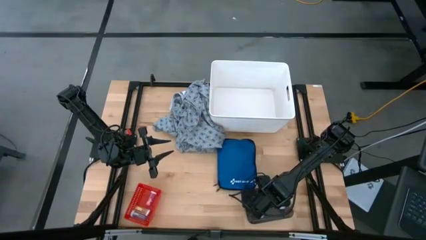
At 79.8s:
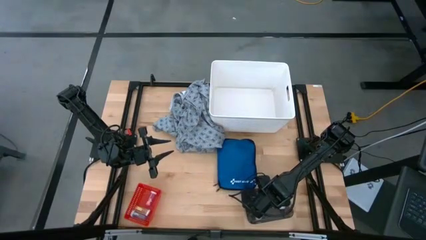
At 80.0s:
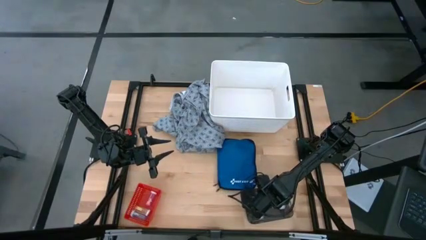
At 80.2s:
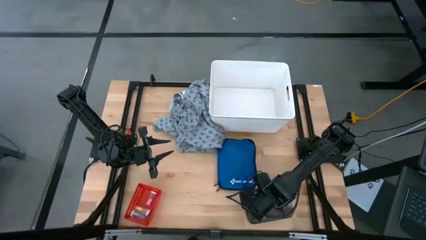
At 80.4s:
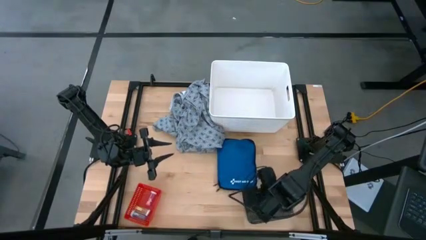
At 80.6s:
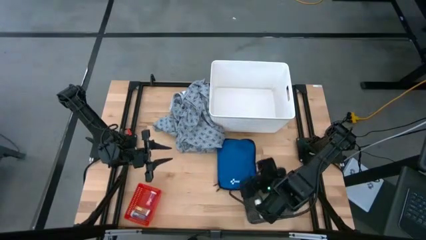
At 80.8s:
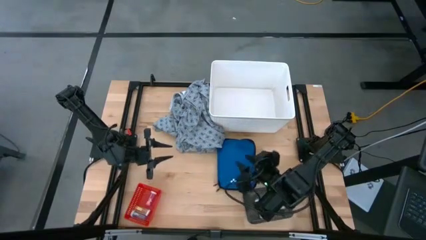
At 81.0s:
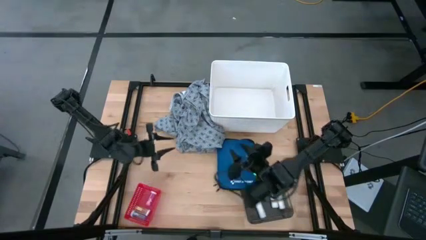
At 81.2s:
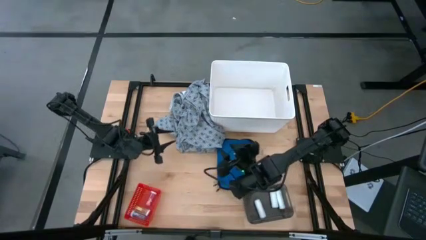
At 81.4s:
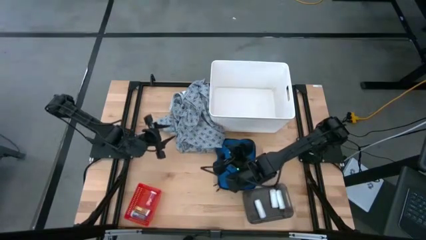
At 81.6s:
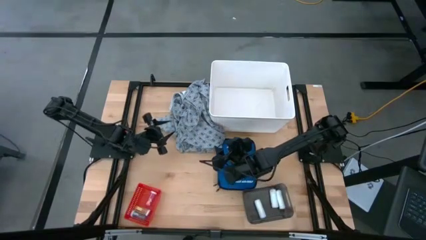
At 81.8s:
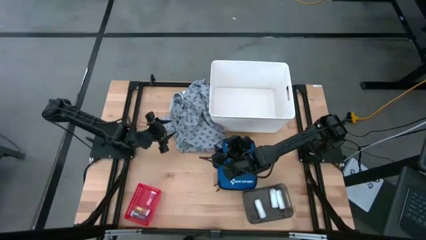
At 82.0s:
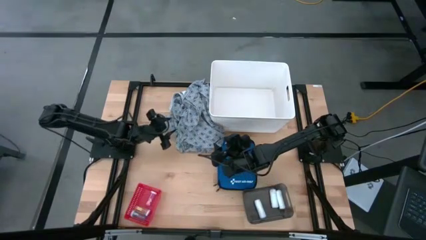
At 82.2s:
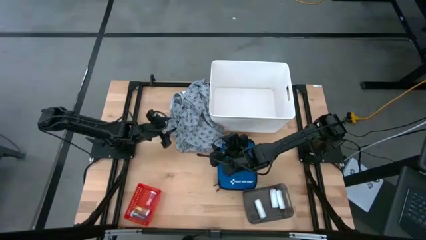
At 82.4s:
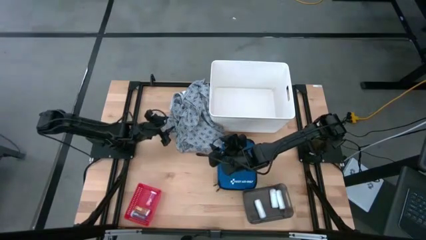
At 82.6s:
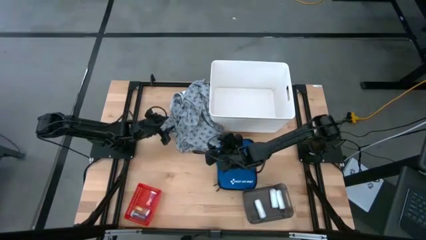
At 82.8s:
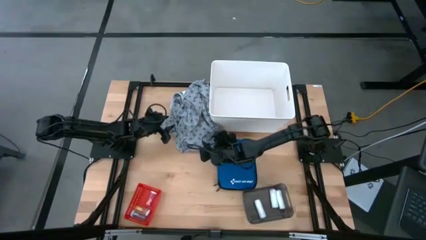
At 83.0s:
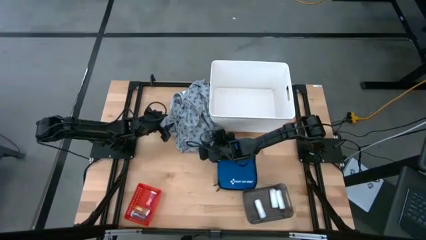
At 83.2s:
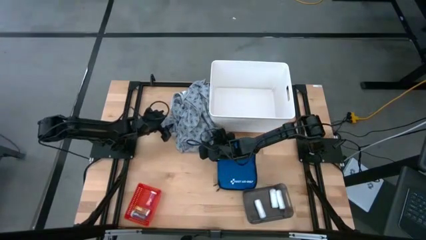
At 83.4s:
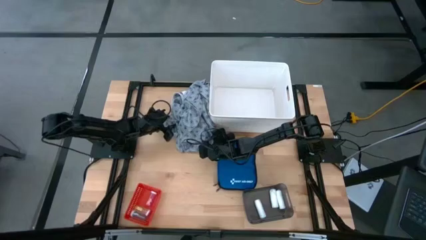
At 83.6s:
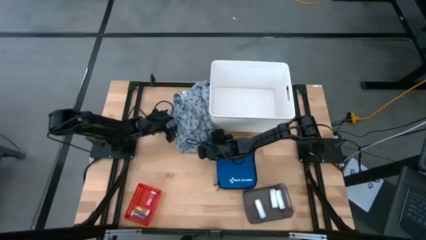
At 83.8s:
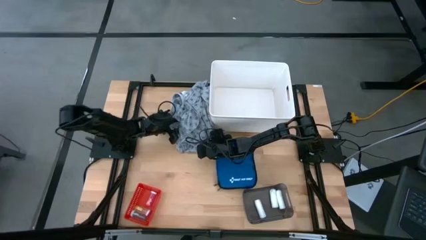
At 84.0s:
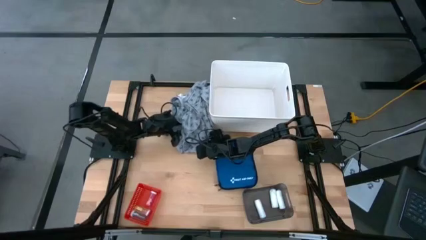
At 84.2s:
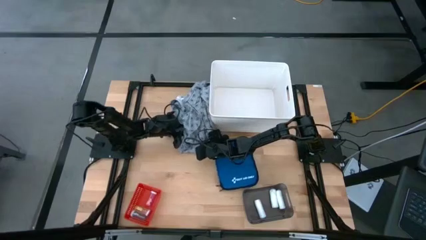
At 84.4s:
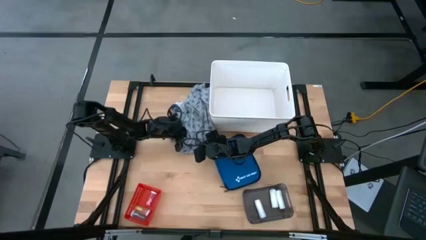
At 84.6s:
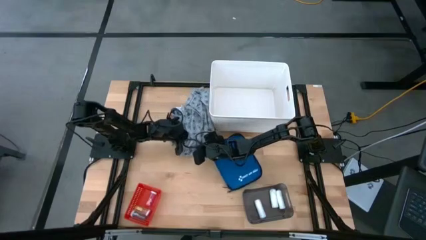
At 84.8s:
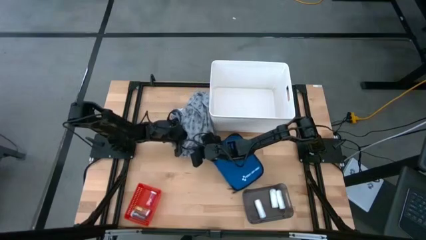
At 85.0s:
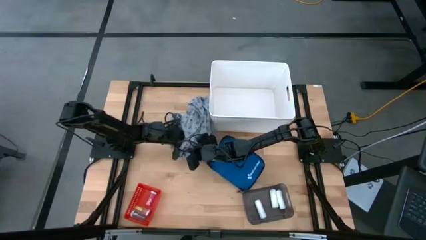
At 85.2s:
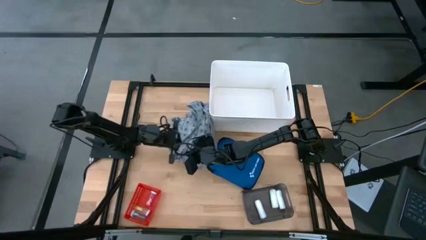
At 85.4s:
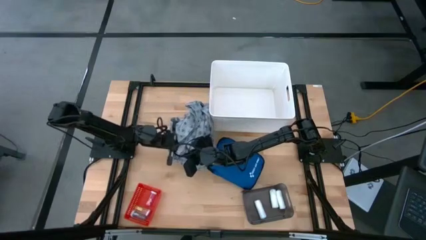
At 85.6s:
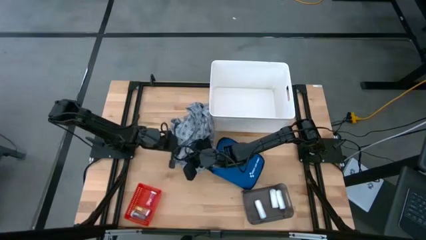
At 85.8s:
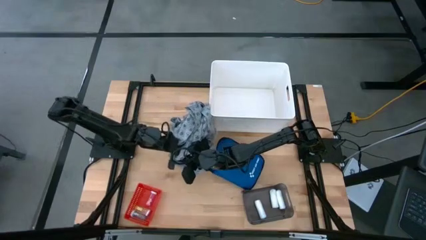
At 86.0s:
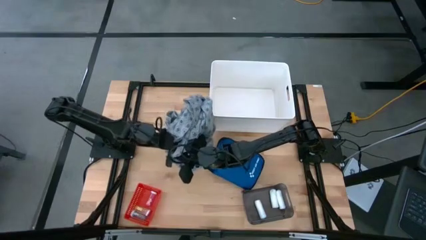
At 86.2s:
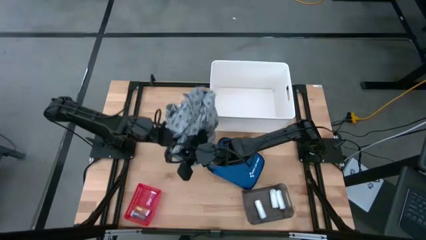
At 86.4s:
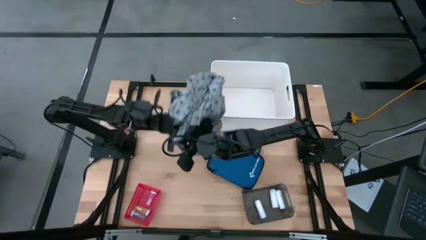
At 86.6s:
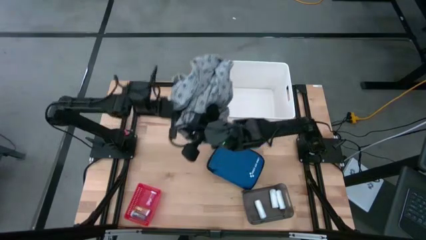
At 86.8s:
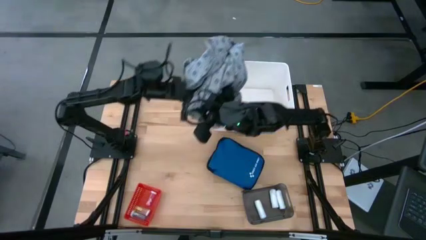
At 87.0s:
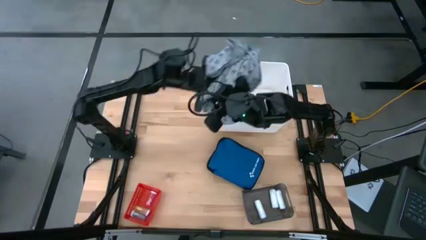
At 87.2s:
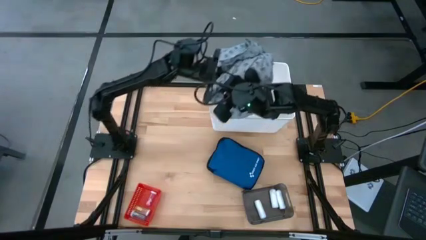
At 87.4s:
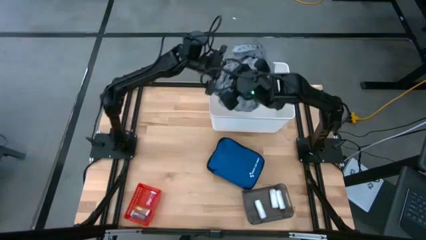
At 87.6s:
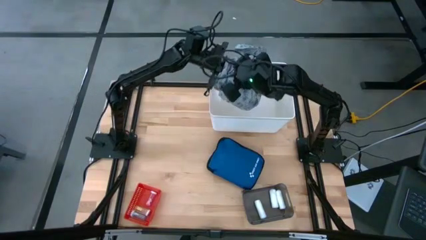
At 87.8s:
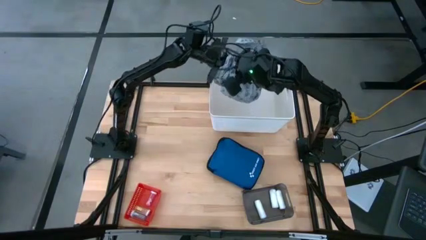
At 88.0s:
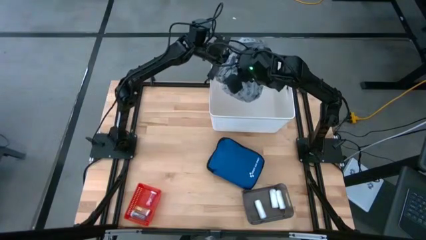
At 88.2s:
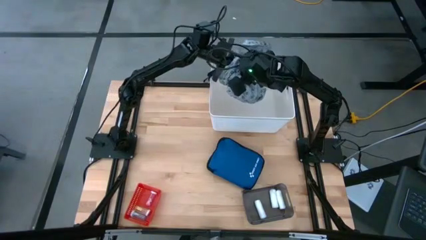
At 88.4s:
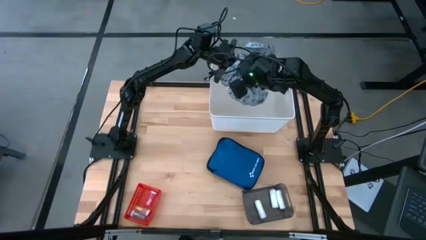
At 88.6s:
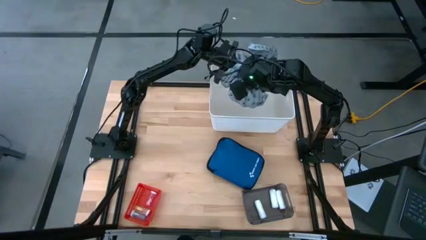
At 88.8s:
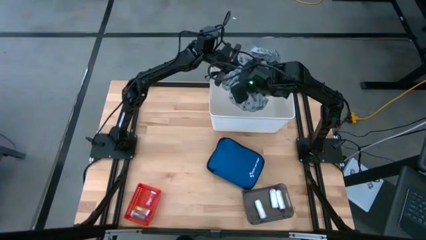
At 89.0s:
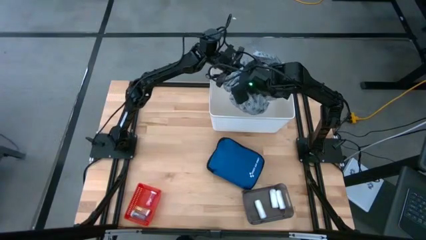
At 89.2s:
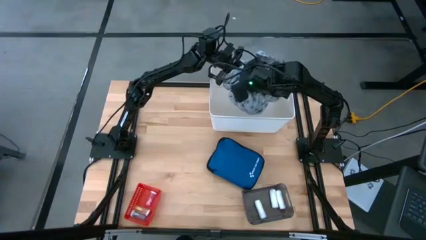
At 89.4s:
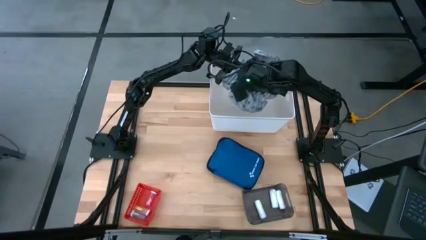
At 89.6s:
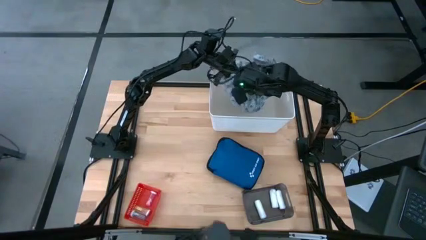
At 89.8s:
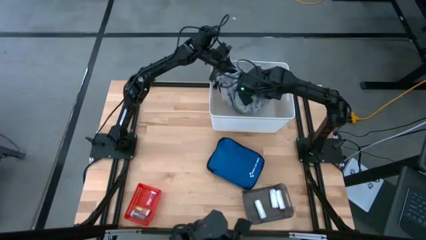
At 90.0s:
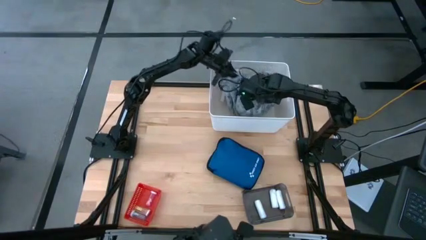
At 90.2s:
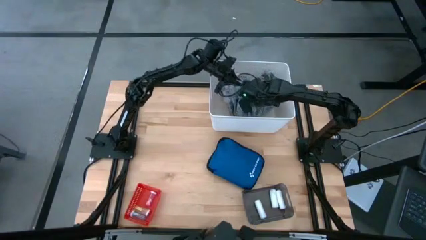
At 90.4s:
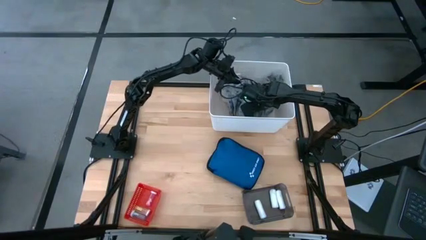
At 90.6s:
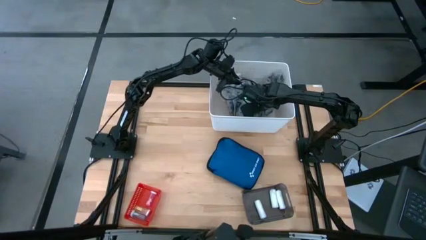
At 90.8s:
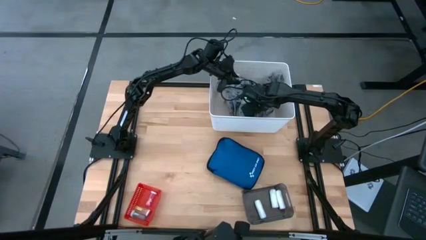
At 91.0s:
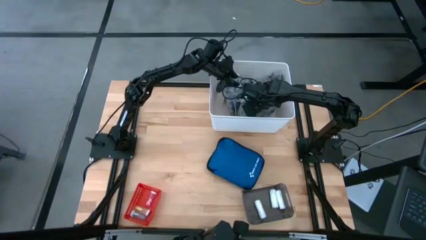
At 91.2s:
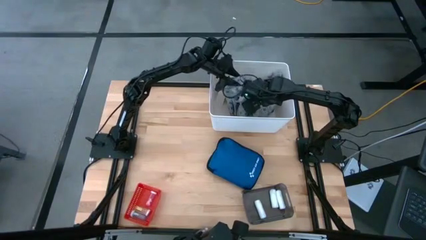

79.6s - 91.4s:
Task: Pick & Place Medicine items
Put the light blue patient gown into the white bin

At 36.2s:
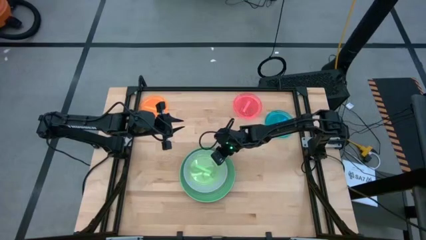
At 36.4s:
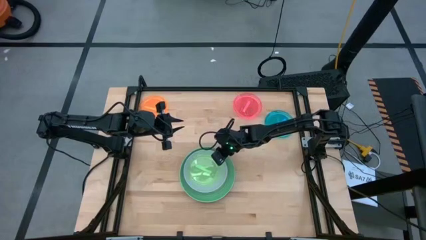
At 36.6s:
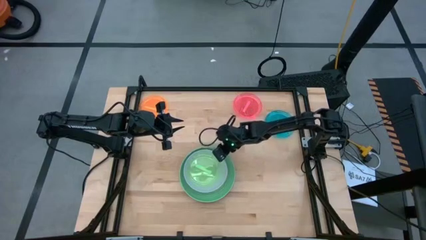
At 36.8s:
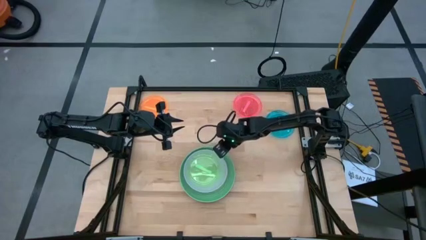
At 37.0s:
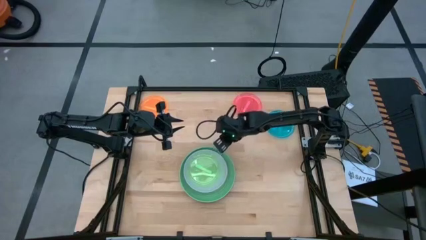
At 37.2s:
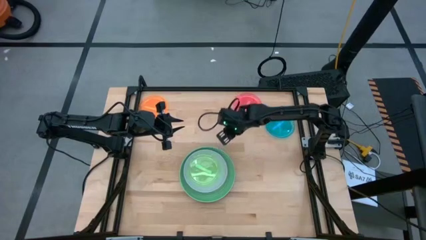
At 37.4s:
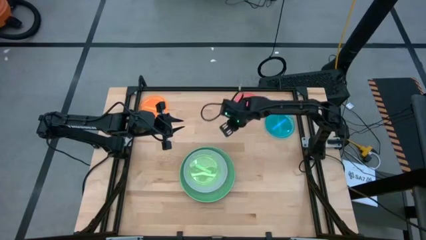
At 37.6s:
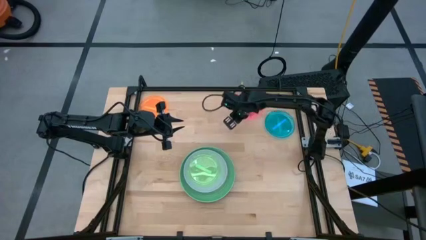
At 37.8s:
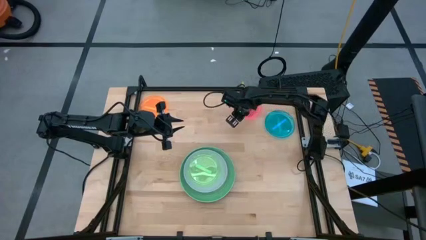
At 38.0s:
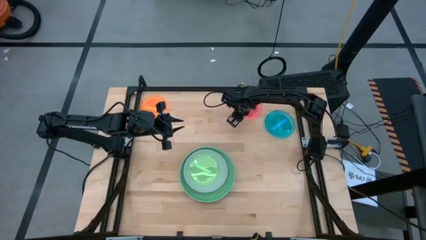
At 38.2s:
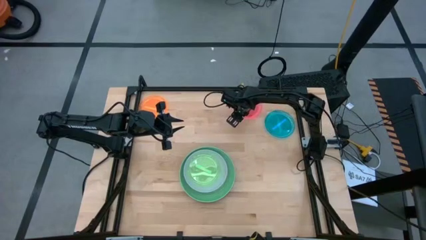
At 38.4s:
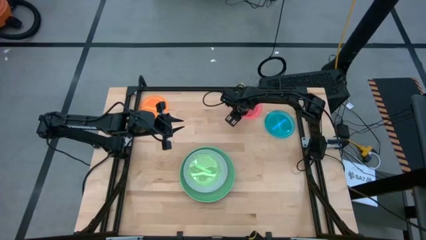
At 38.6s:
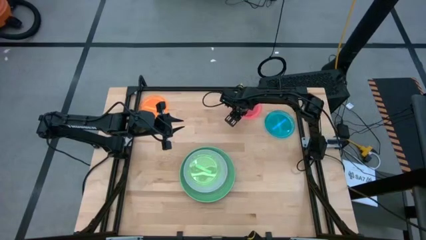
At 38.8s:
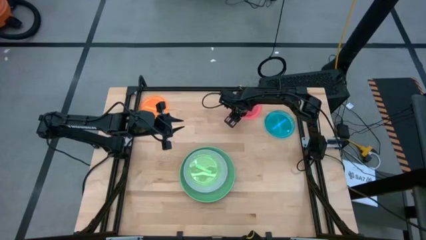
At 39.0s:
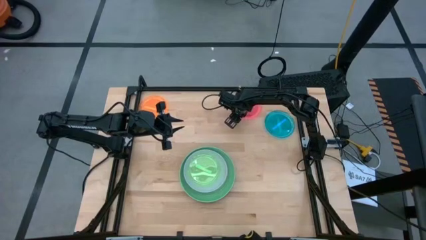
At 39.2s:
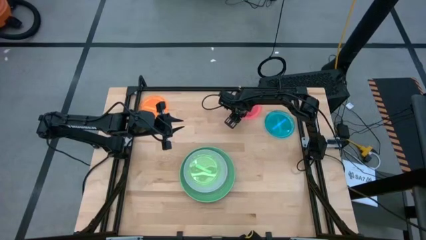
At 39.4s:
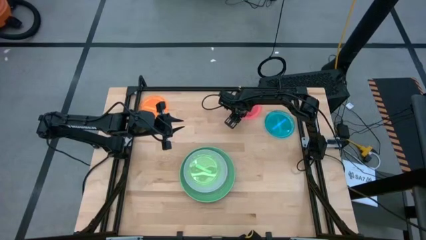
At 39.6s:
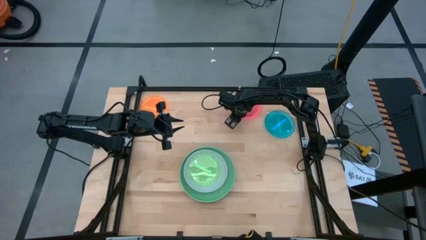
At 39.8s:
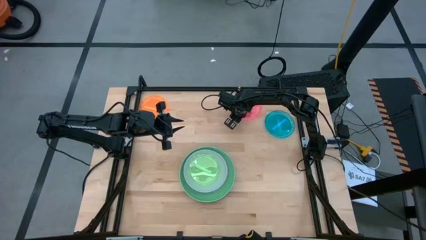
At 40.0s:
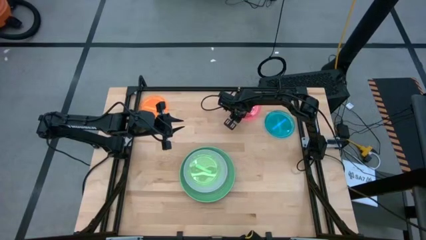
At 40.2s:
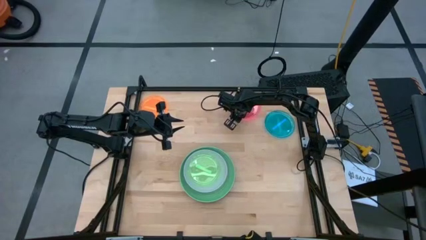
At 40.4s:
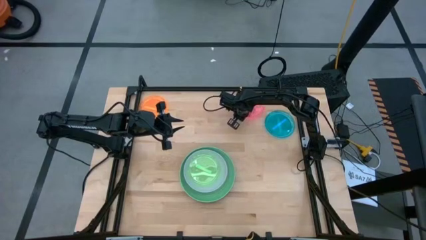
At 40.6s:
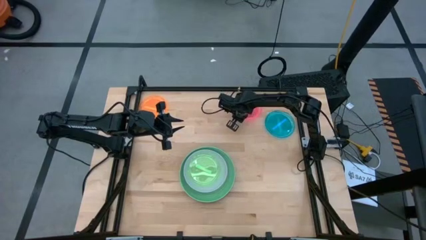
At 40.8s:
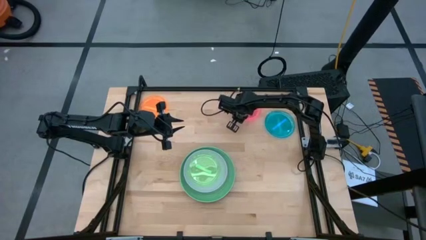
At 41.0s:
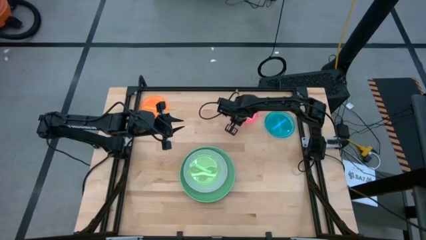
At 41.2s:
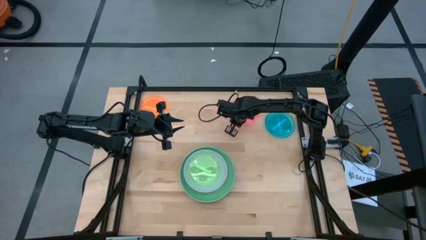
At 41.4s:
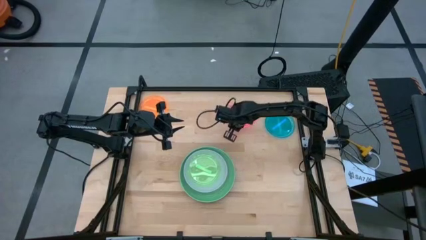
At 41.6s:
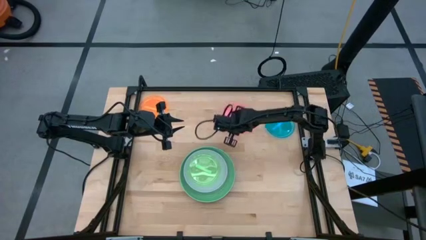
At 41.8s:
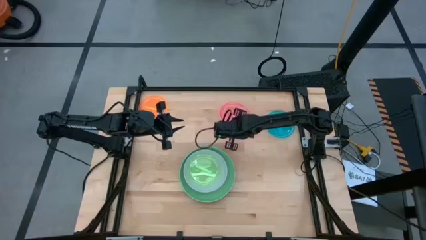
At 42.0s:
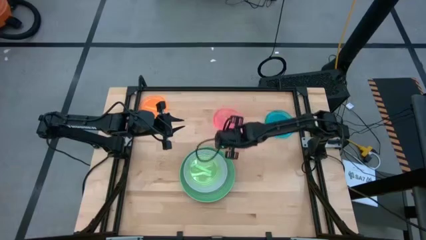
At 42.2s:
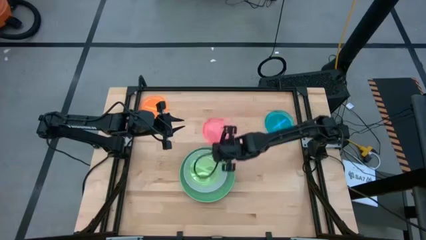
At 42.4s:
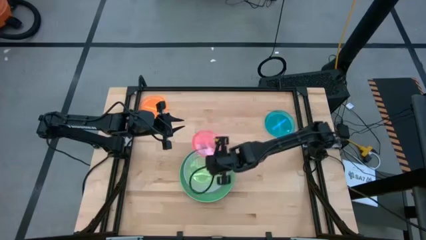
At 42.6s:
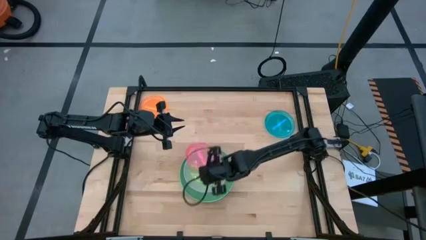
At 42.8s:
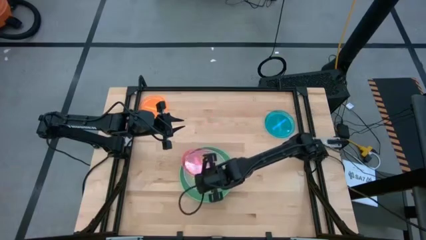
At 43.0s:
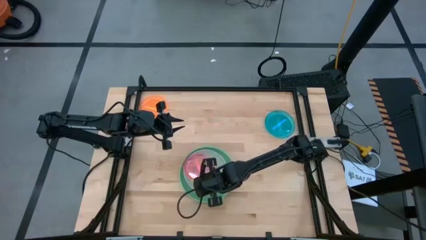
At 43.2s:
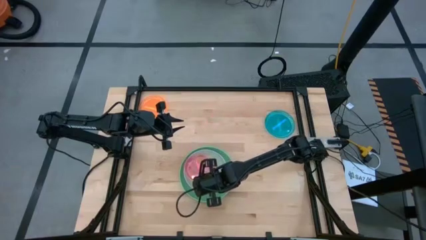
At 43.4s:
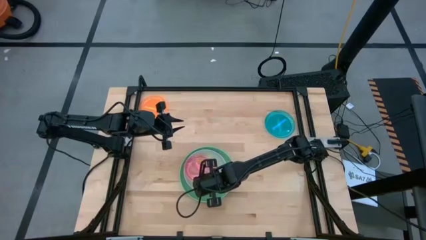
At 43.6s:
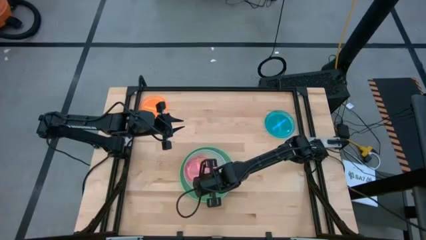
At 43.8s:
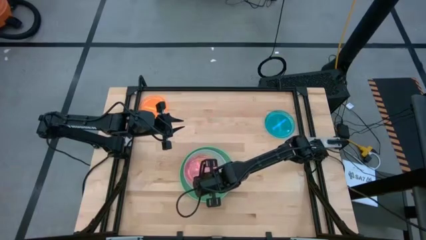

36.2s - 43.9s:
Task: Stack plastic plates
Stack the small pink plate on the small green plate
